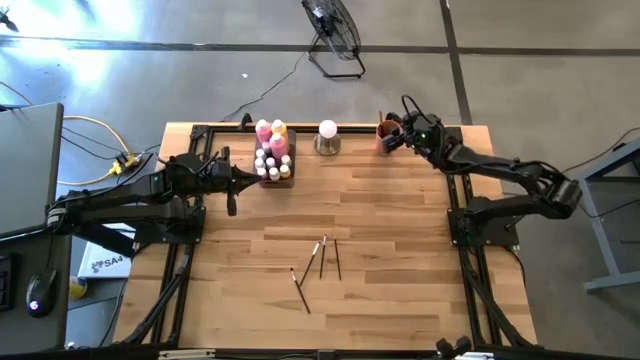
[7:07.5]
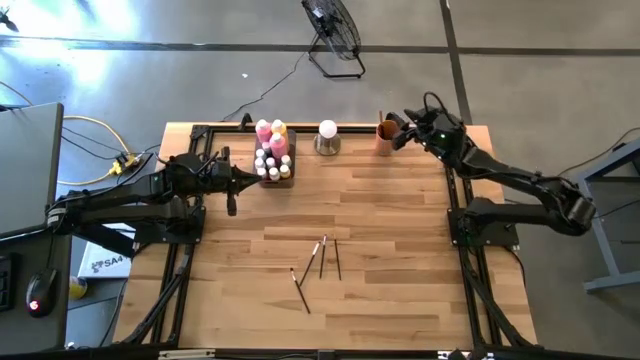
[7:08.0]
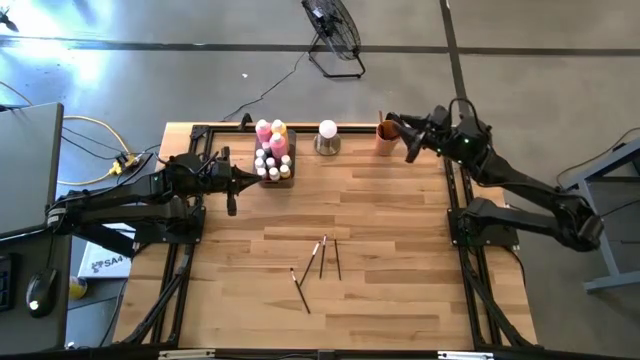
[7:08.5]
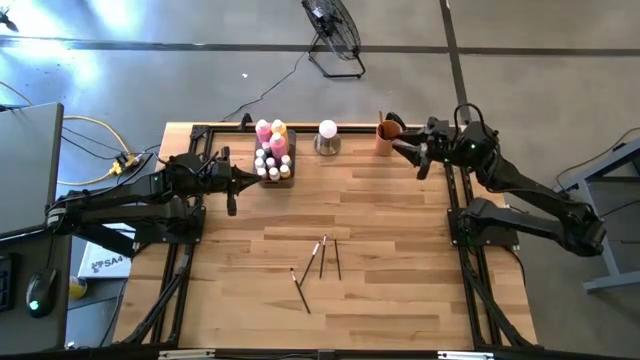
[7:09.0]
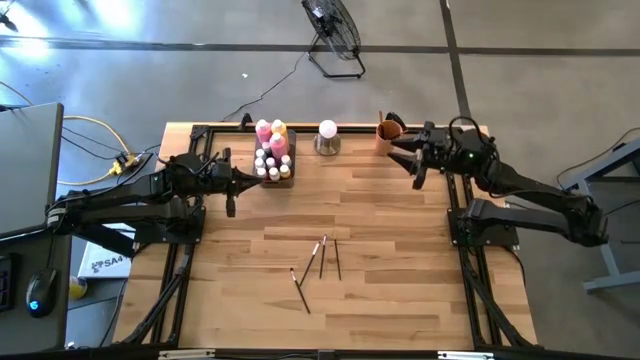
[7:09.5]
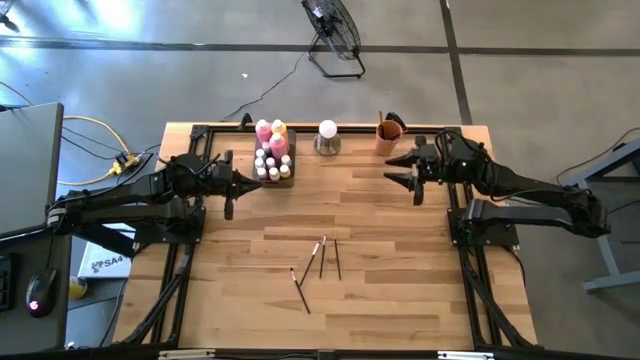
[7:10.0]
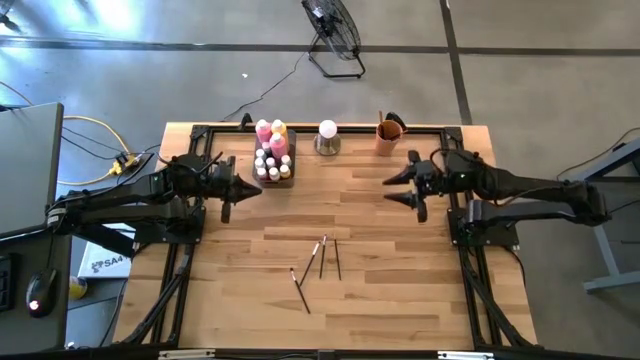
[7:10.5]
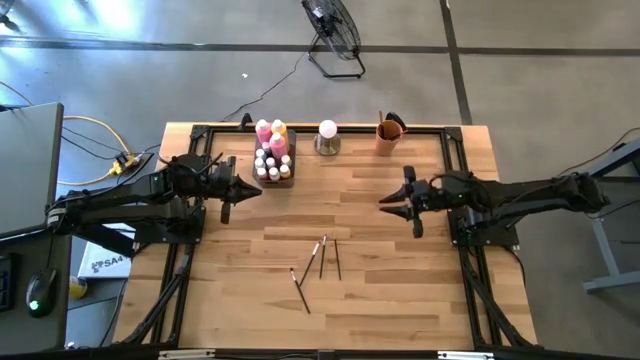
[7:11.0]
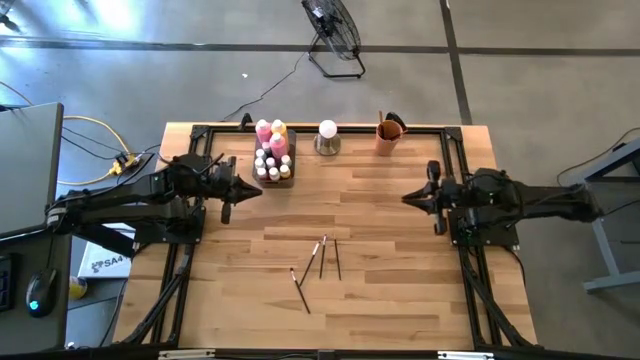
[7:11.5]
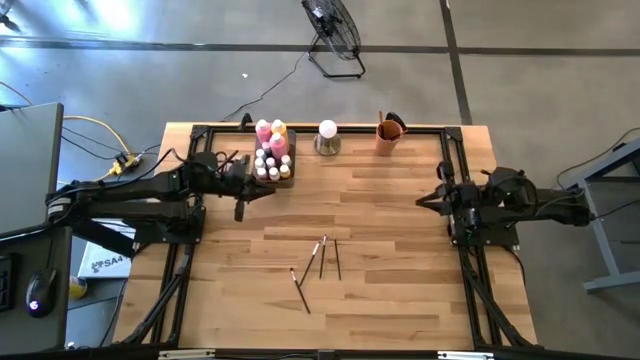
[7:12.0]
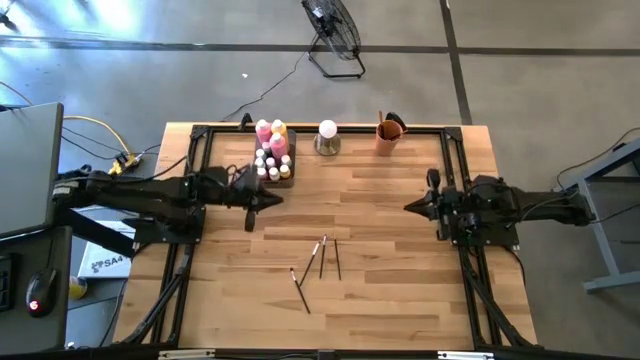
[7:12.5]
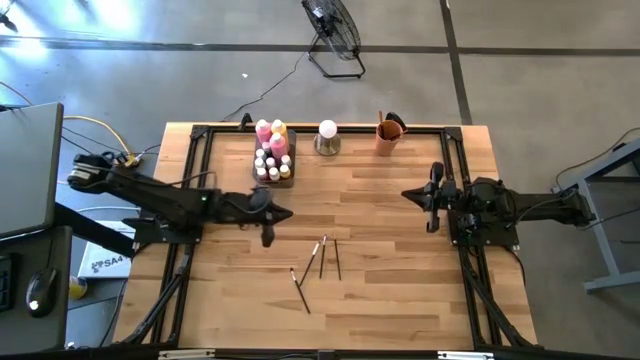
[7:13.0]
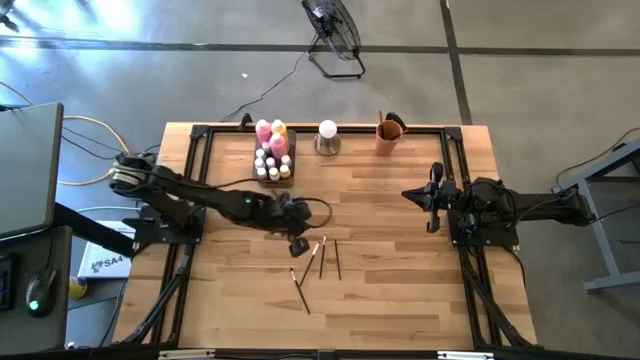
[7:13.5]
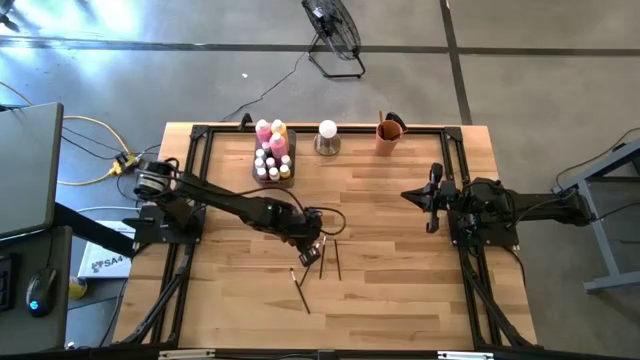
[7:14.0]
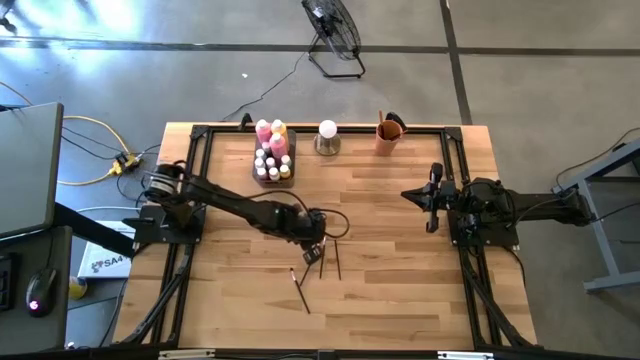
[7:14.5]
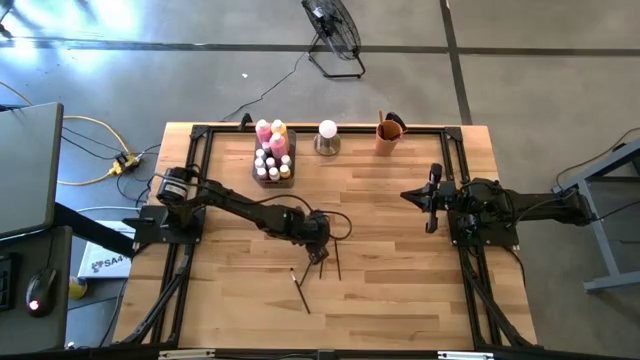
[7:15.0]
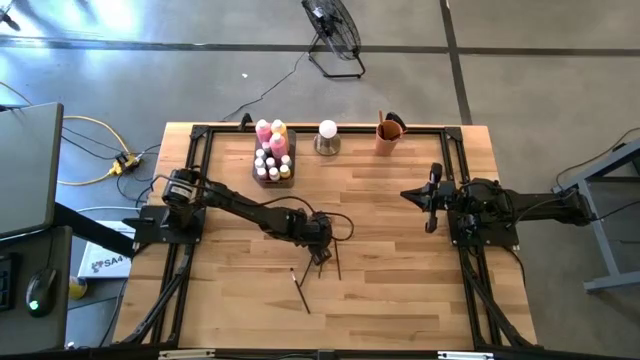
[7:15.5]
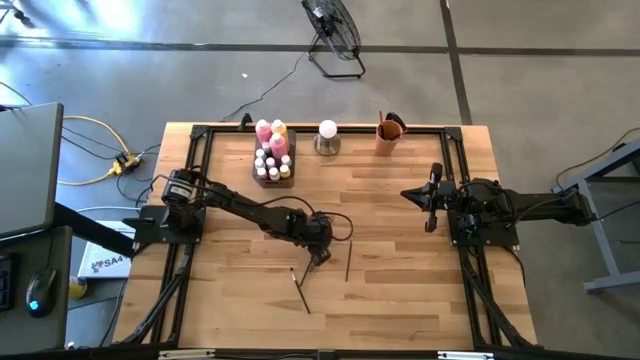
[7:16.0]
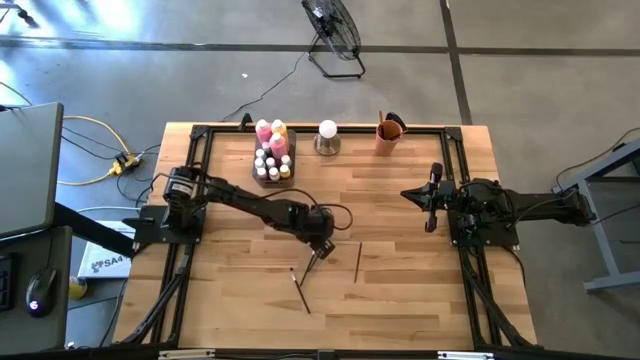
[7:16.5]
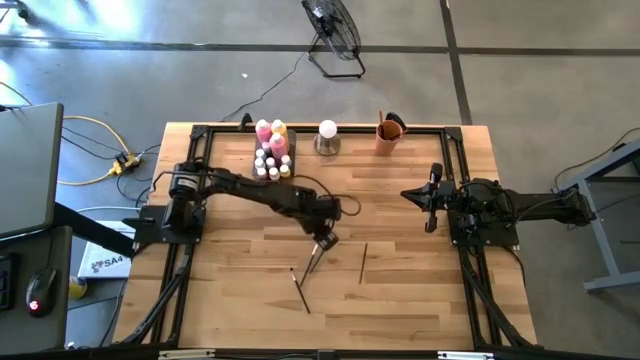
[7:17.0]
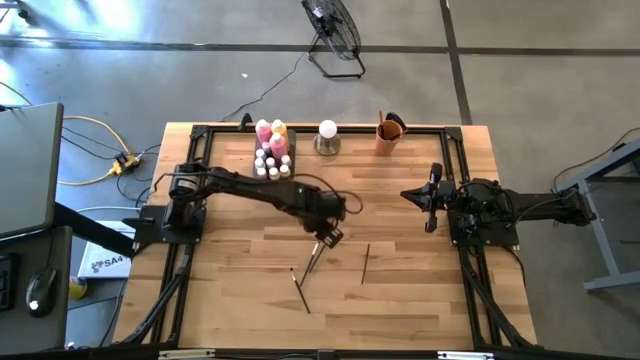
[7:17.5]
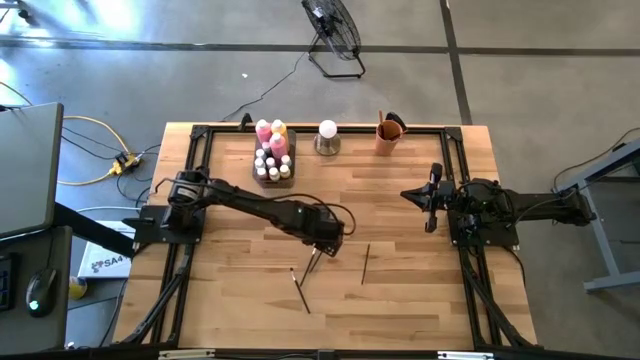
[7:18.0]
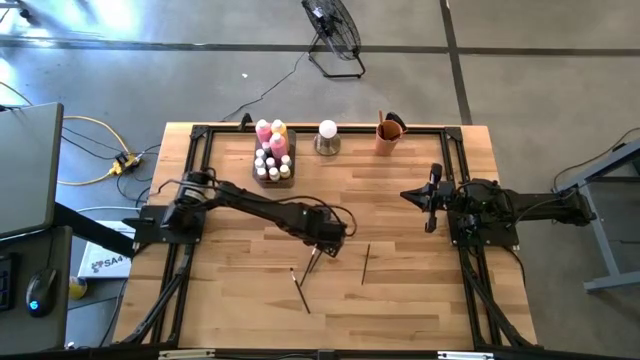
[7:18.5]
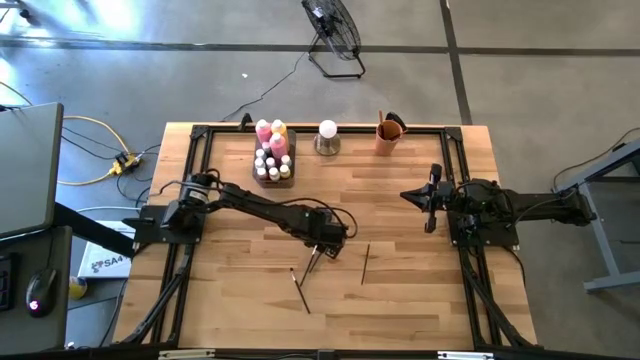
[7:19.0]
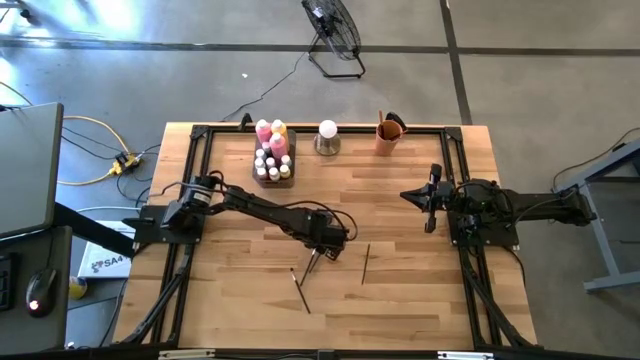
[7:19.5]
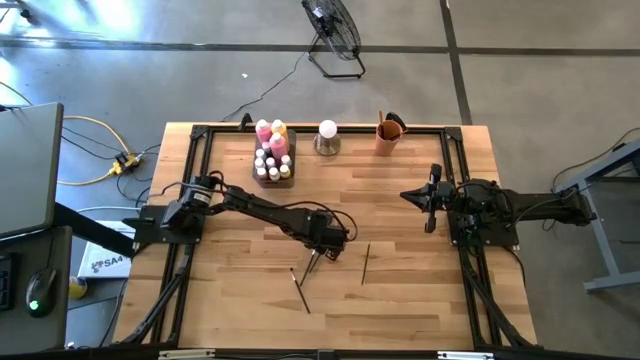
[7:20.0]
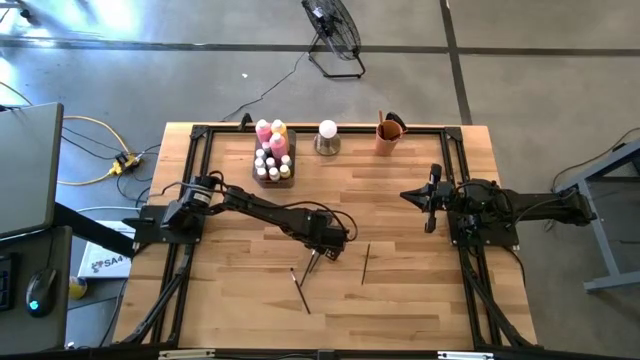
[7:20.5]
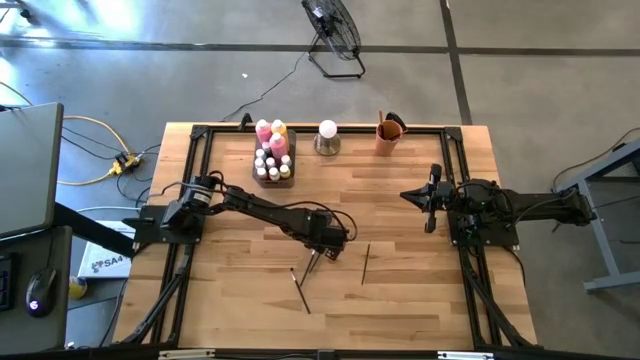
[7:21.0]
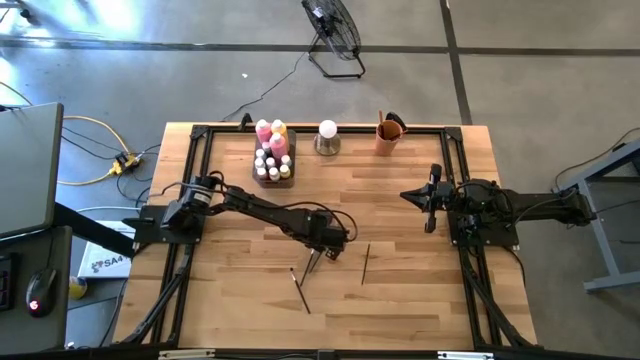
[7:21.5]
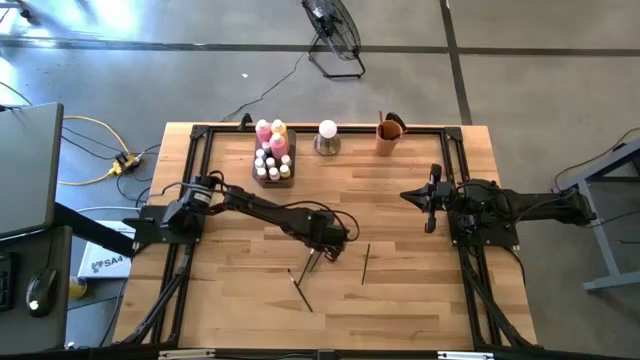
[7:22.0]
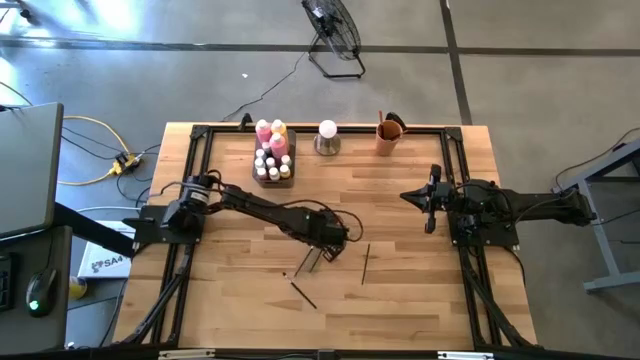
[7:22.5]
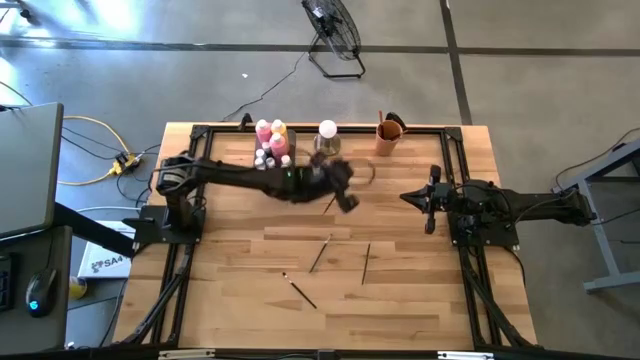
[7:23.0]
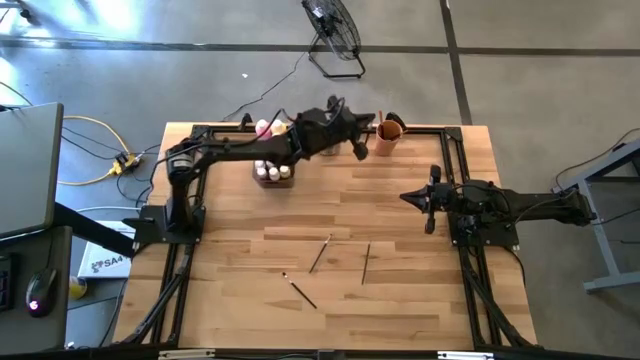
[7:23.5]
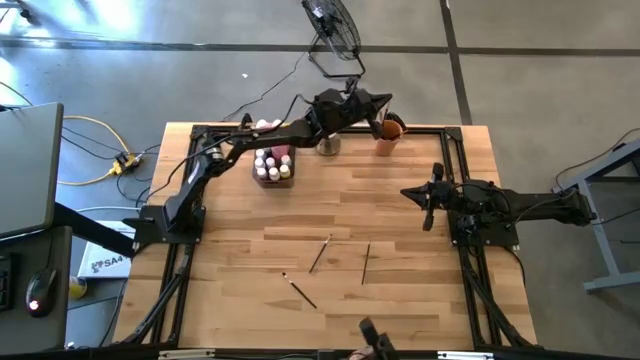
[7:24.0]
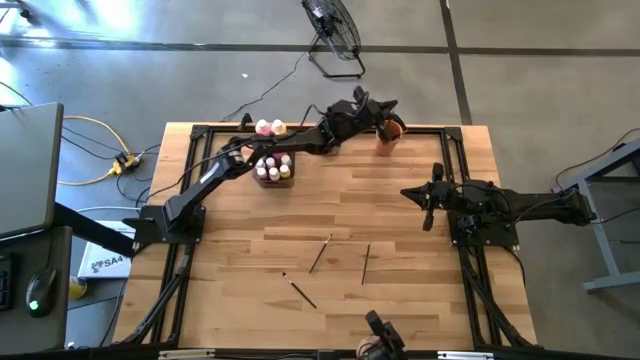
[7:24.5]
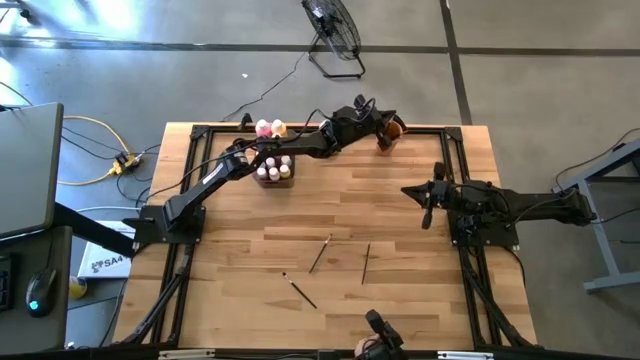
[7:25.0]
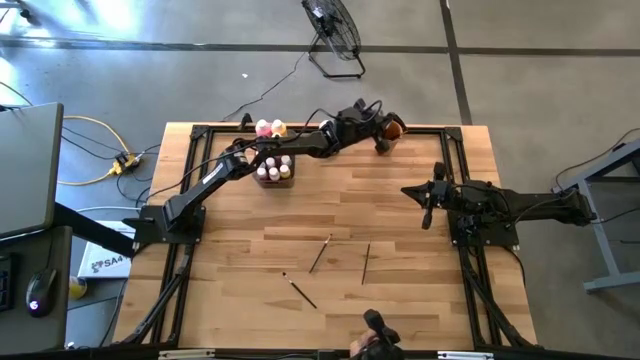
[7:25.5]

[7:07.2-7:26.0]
Task: Pick & Place Paint Supplies
Put the silver paintbrush into the orange cup

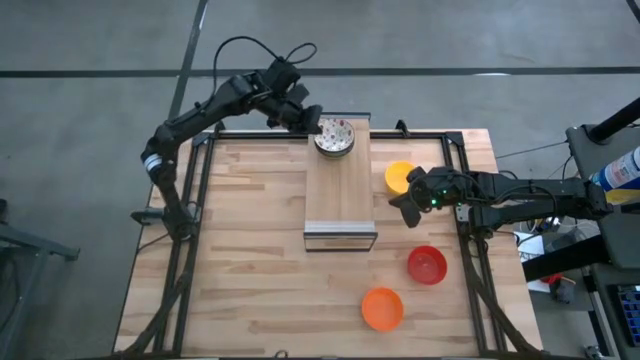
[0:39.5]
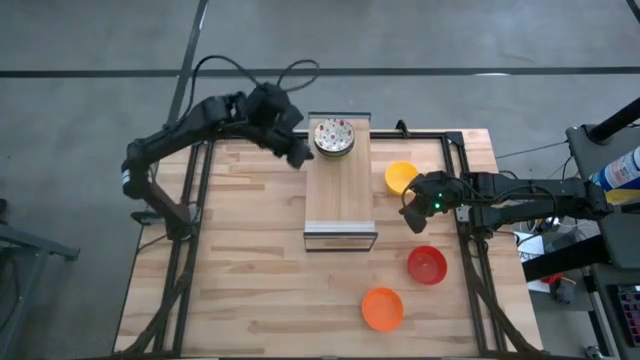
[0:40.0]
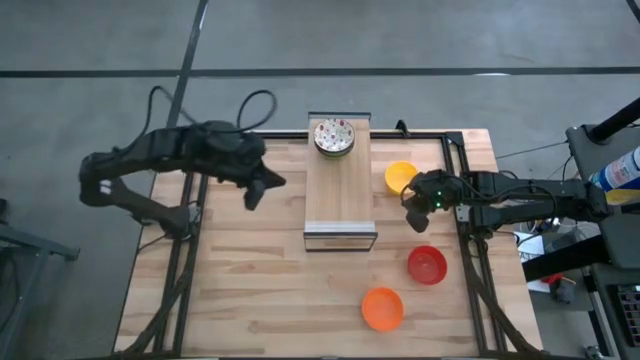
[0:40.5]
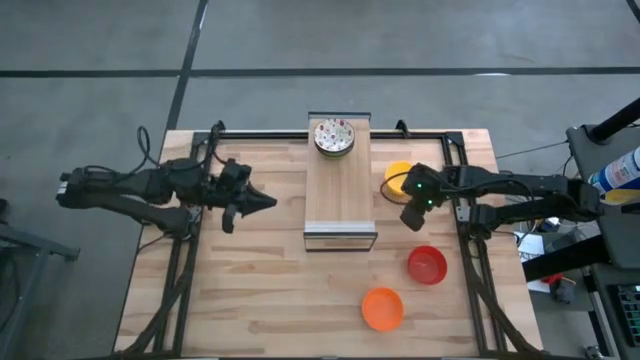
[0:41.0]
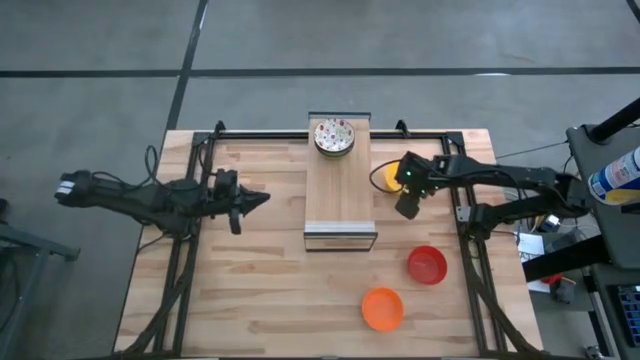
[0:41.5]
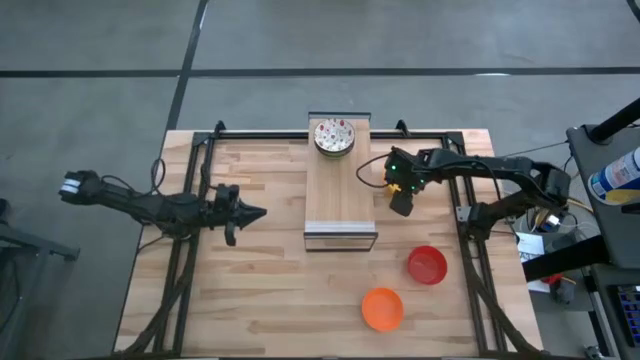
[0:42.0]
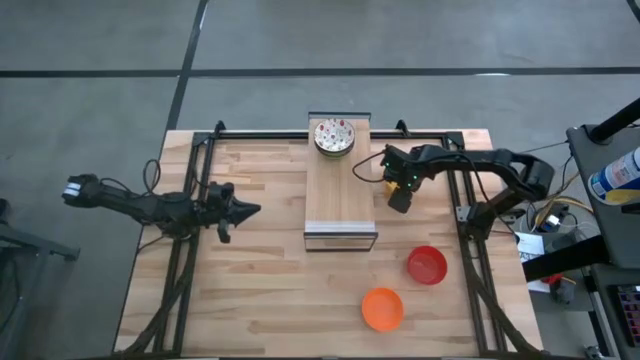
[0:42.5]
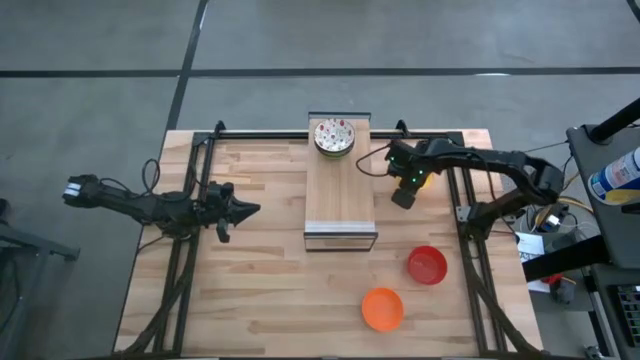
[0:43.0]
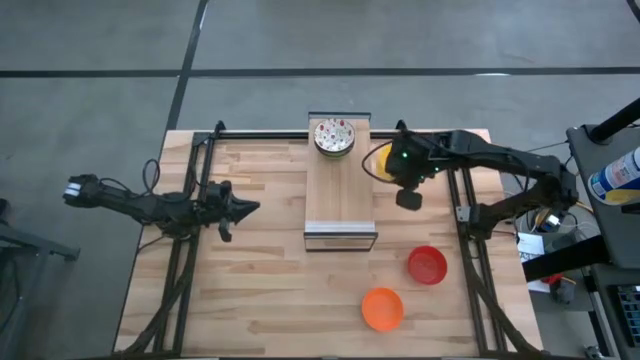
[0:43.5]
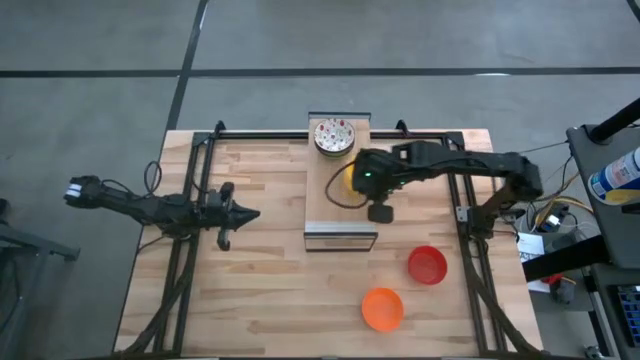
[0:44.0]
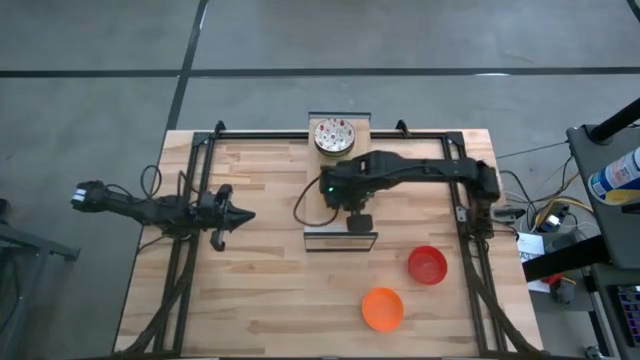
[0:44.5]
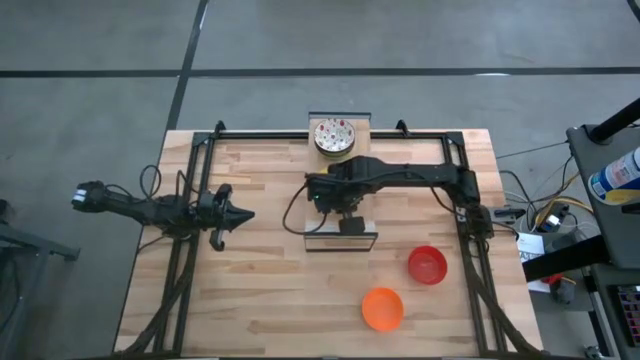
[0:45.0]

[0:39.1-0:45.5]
Task: Pick & Place Mini bowls
Put the yellow bowl on the shelf
